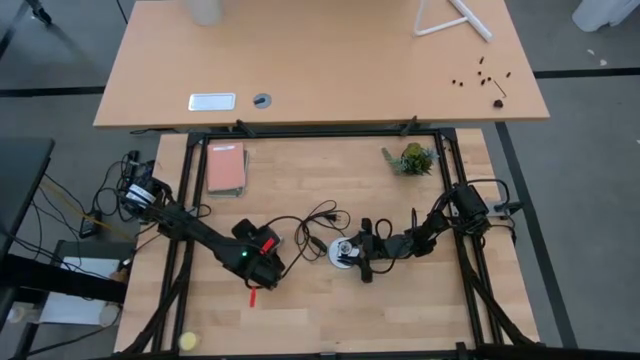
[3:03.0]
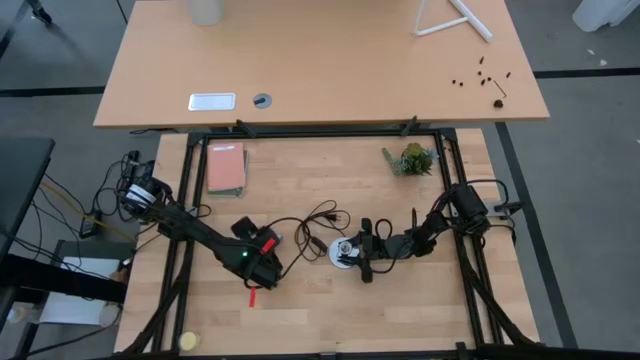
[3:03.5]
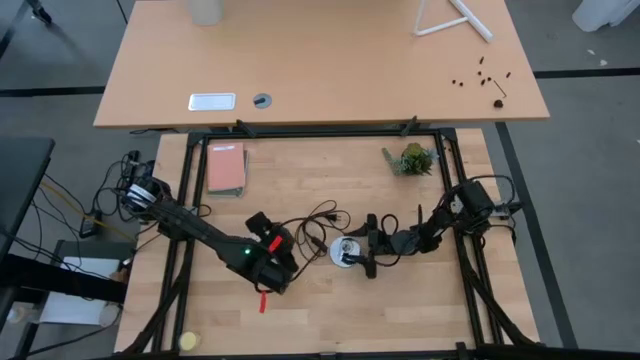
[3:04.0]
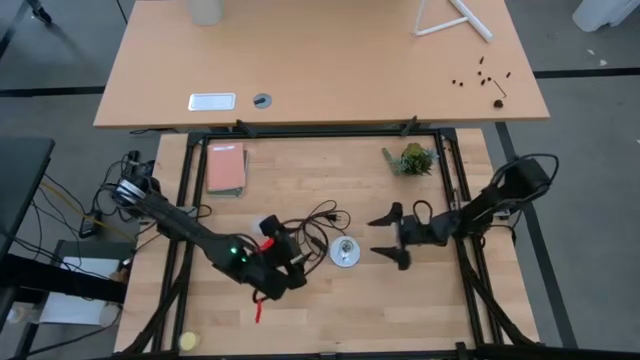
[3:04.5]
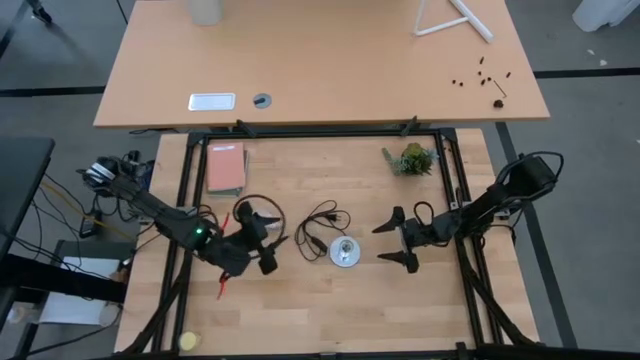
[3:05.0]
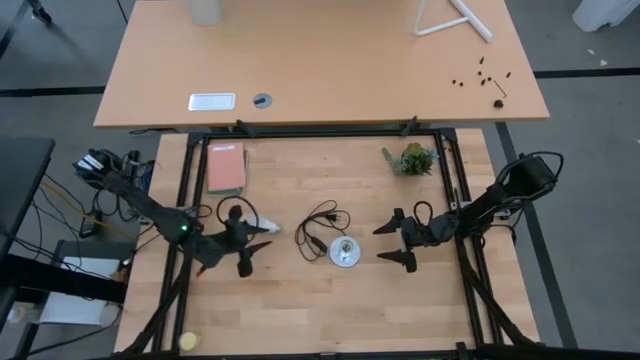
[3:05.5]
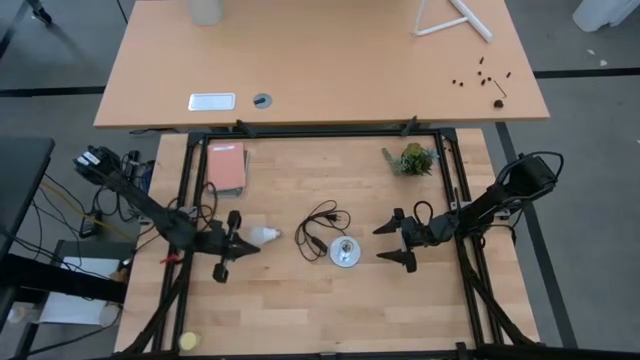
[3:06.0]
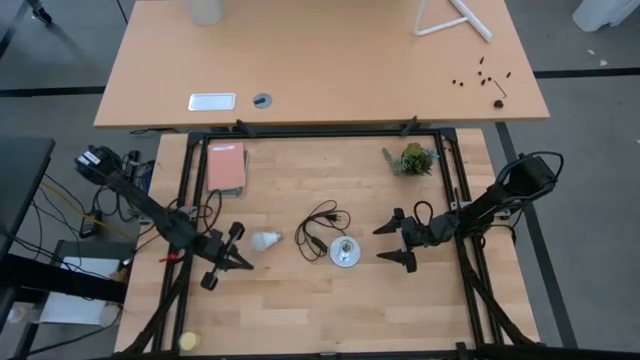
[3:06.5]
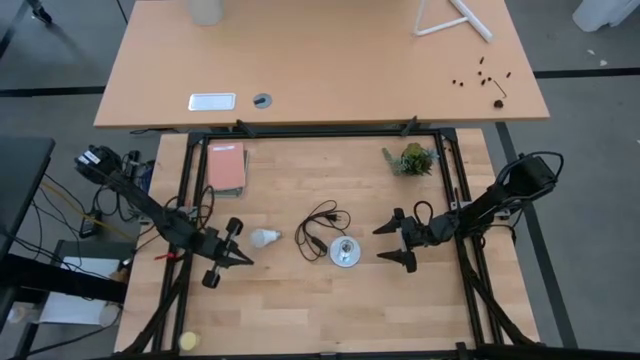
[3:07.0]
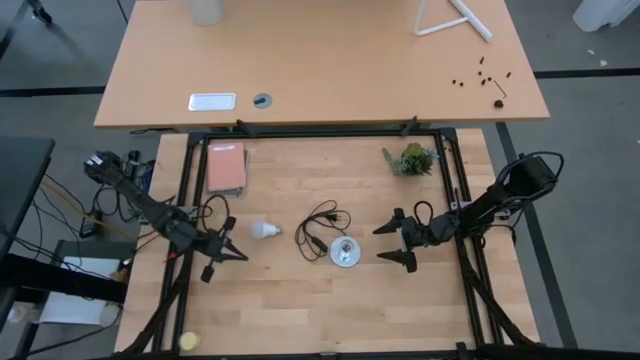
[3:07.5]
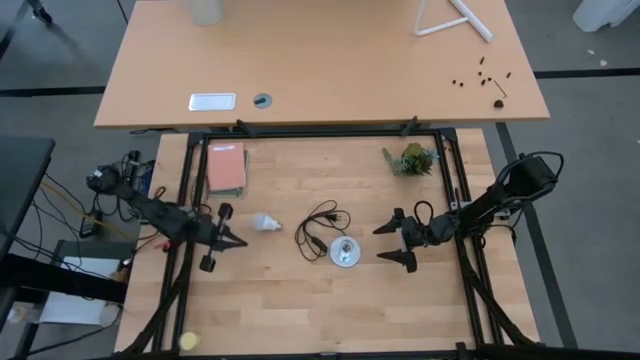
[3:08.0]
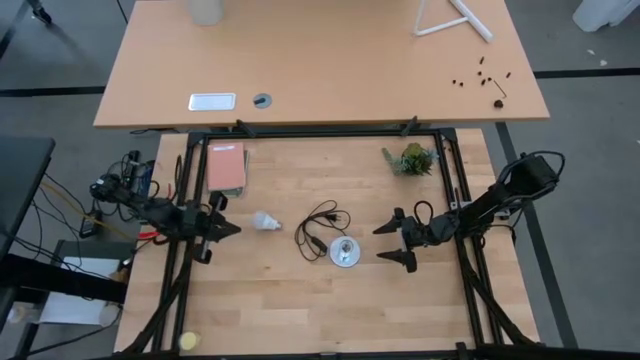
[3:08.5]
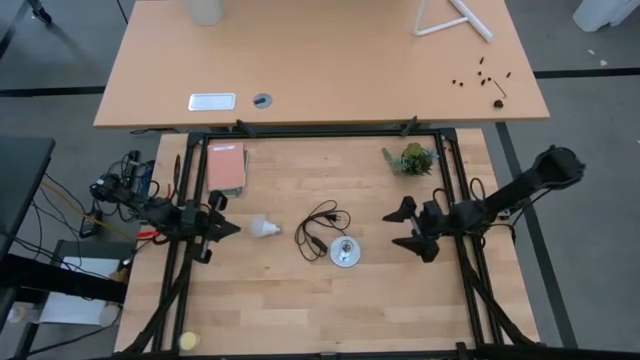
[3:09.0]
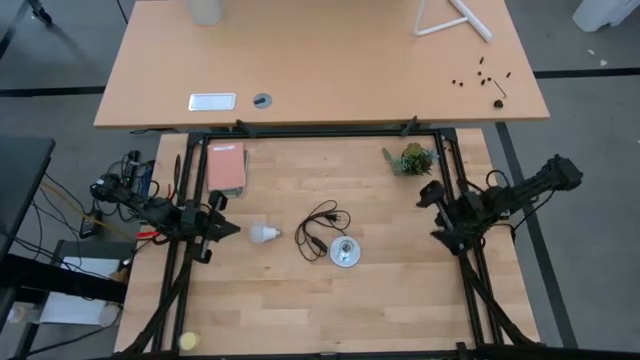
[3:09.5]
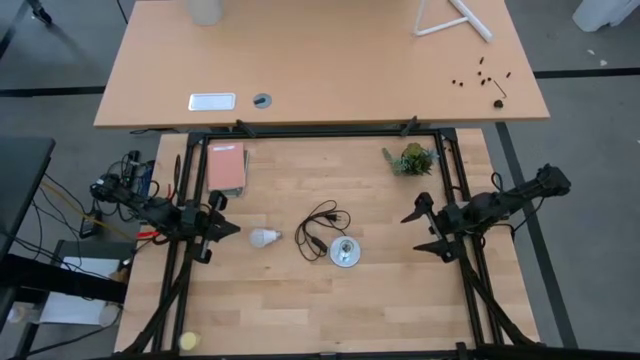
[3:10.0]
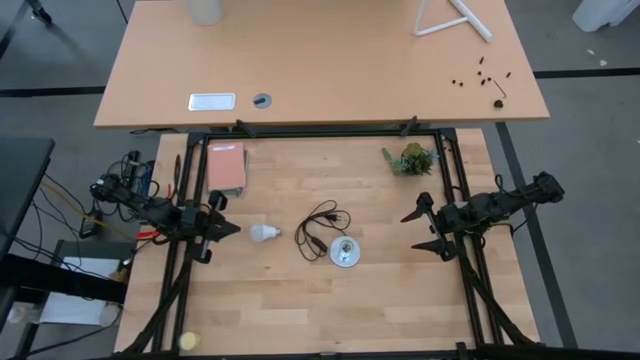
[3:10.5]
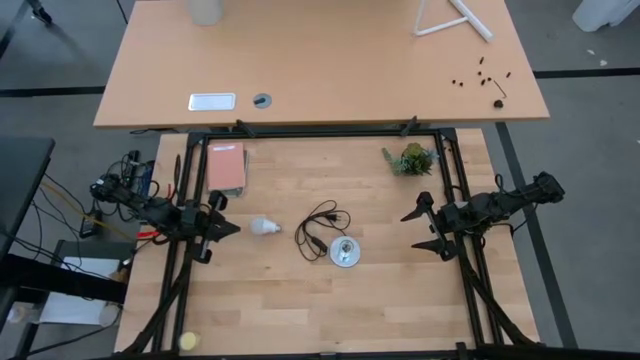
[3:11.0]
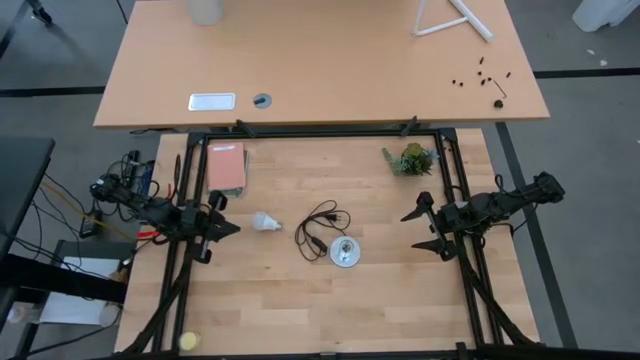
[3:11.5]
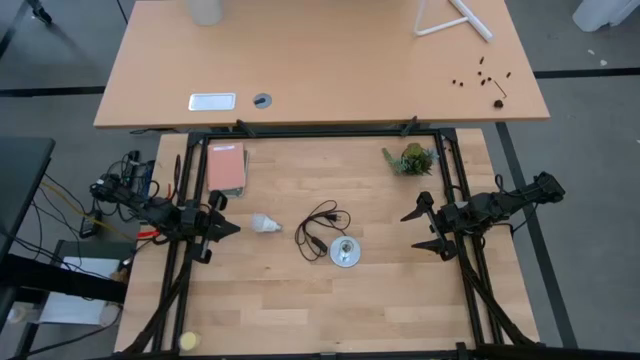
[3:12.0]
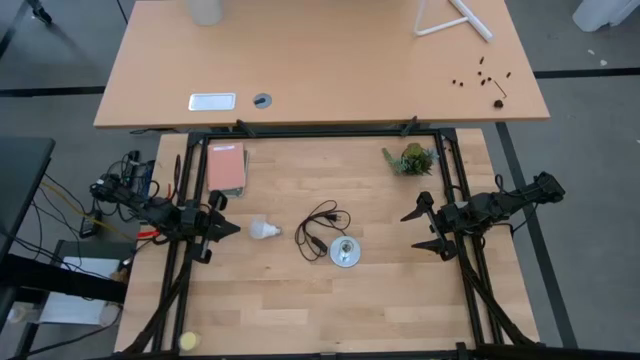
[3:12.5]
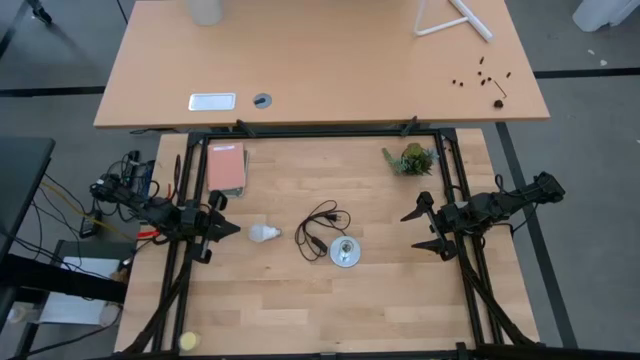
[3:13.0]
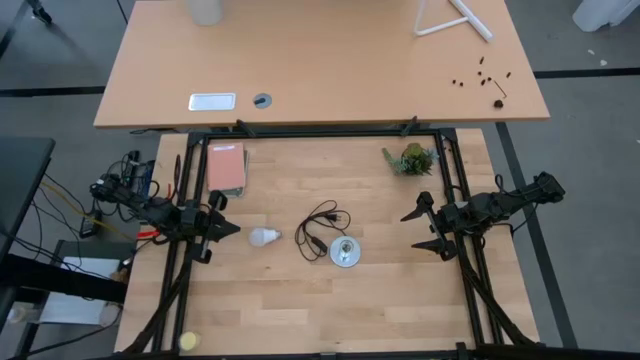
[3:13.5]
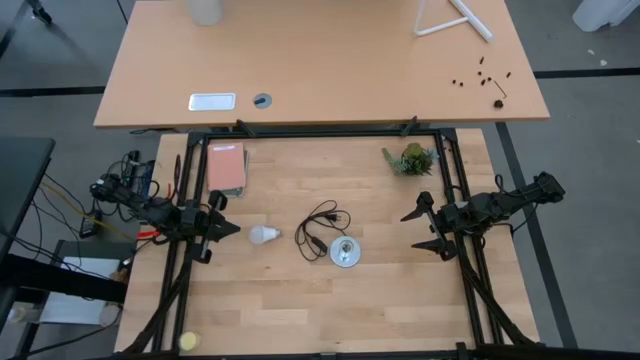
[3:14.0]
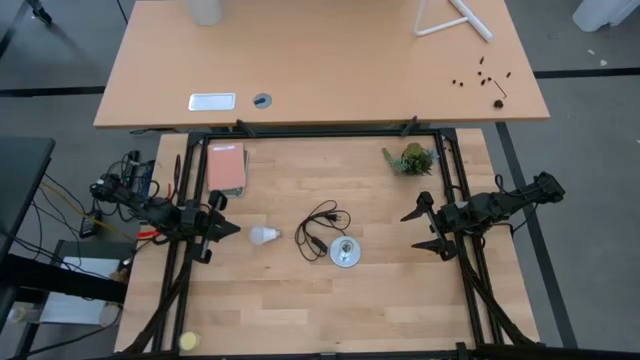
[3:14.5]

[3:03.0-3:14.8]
Task: Screw lightbulb
Return to Home Position

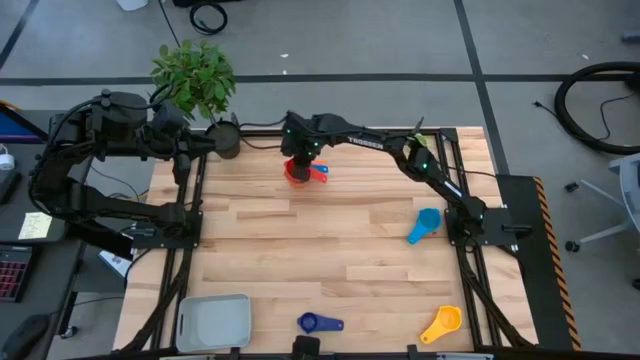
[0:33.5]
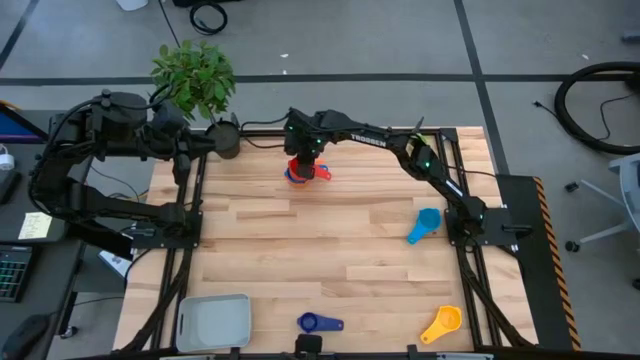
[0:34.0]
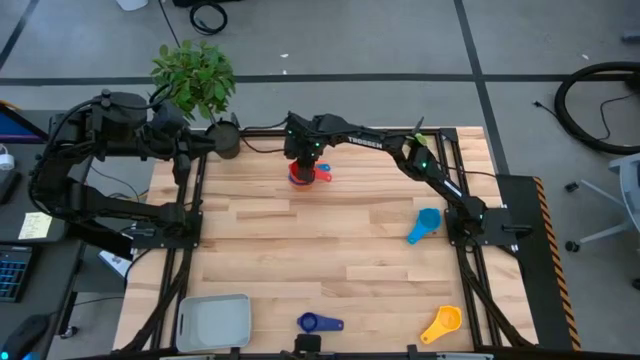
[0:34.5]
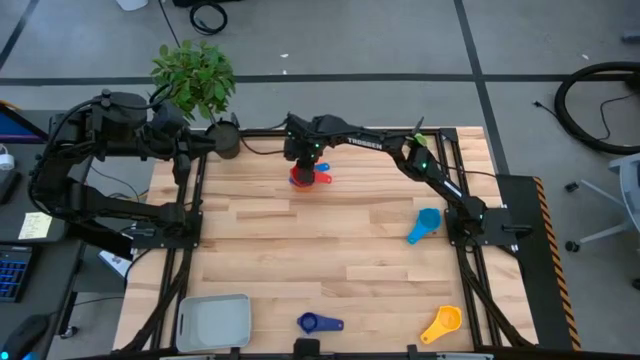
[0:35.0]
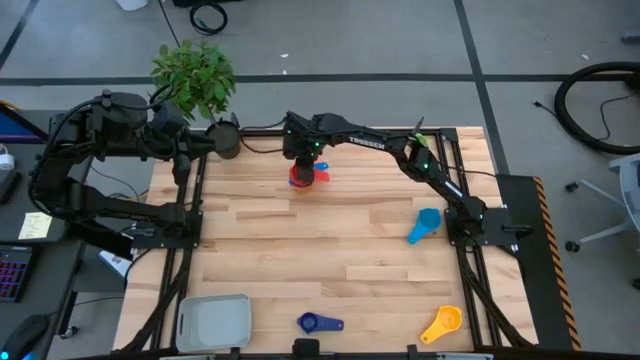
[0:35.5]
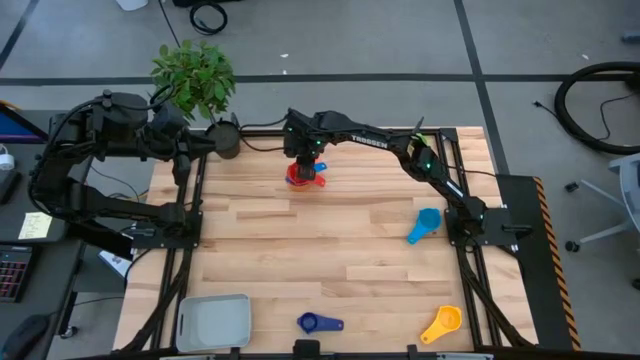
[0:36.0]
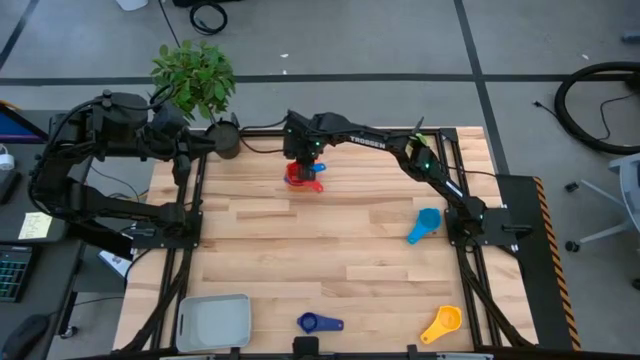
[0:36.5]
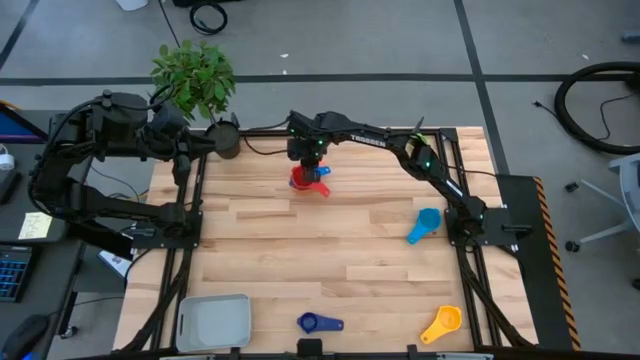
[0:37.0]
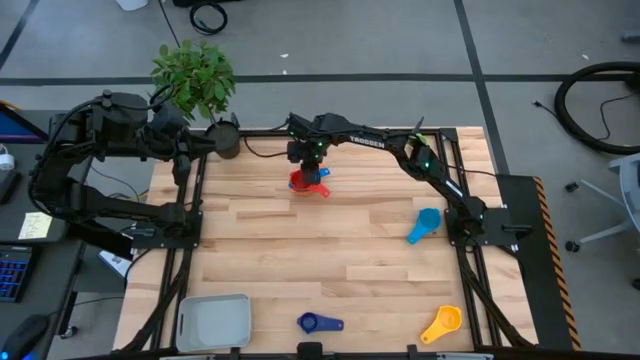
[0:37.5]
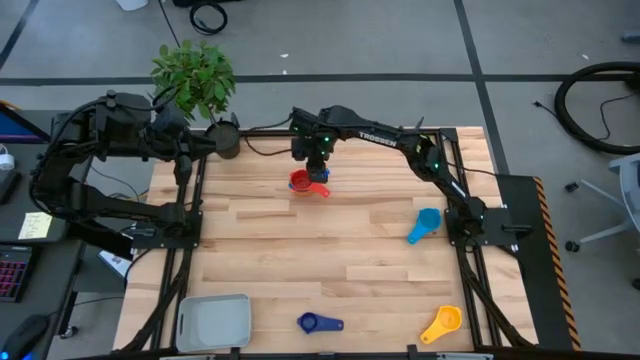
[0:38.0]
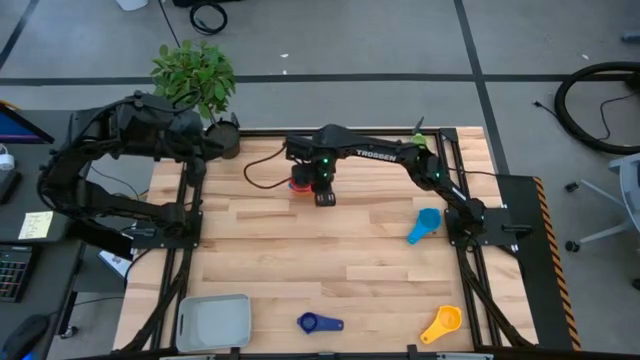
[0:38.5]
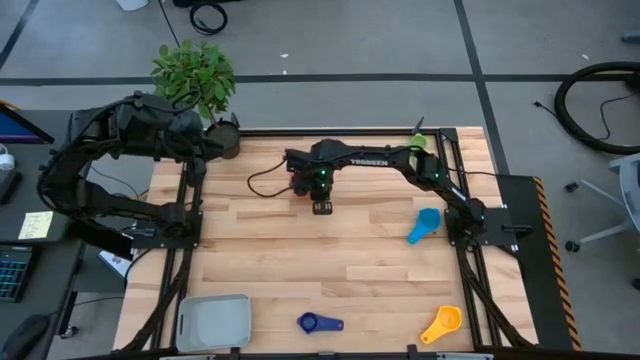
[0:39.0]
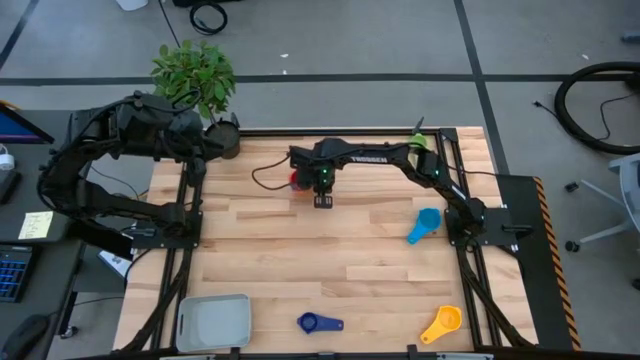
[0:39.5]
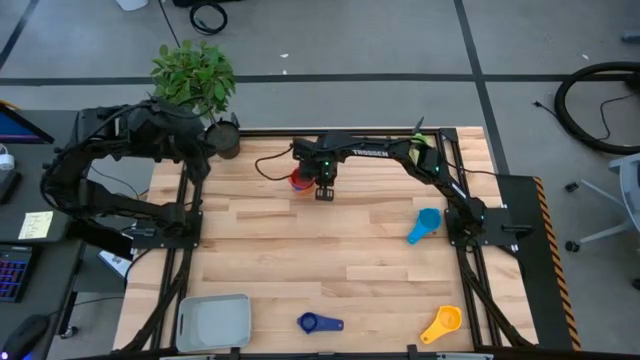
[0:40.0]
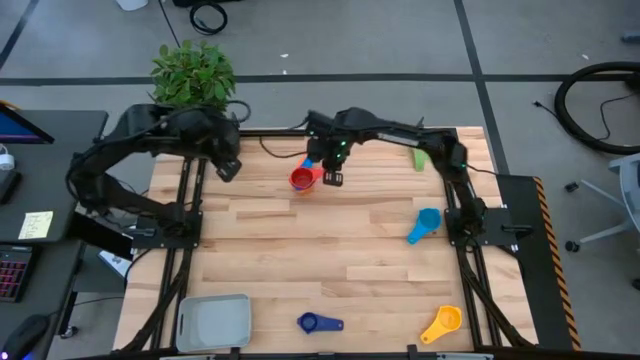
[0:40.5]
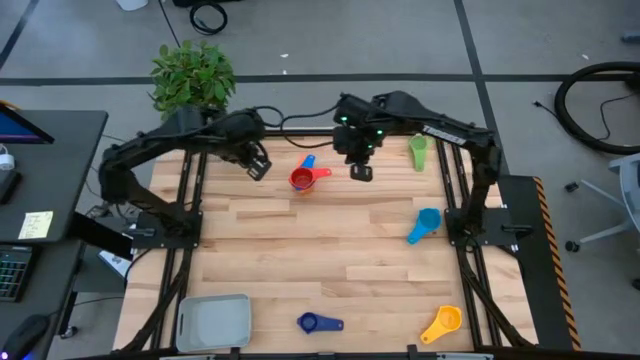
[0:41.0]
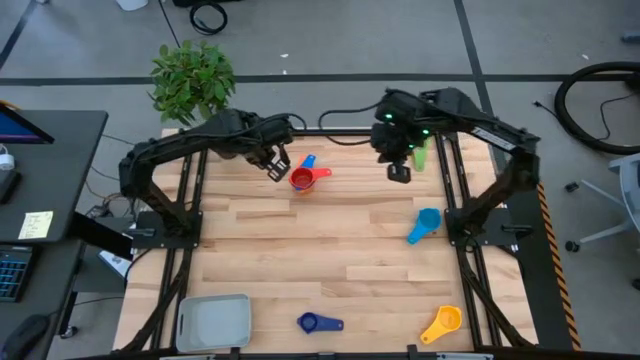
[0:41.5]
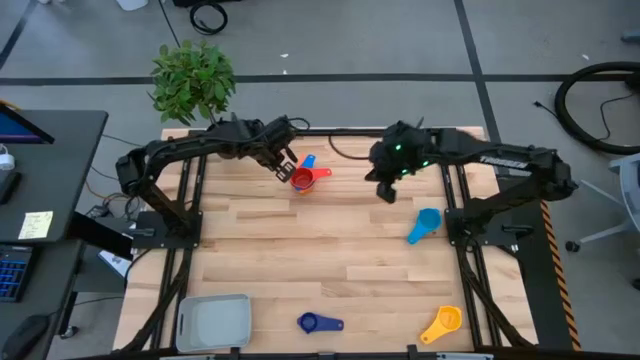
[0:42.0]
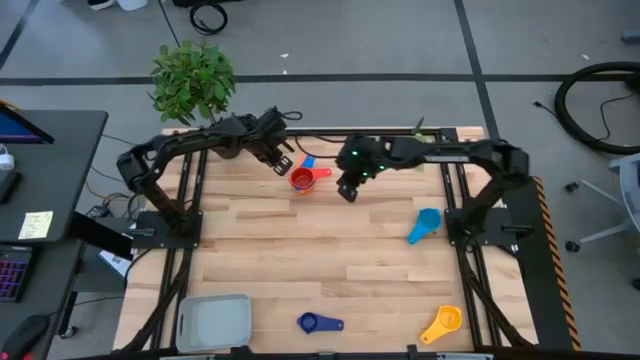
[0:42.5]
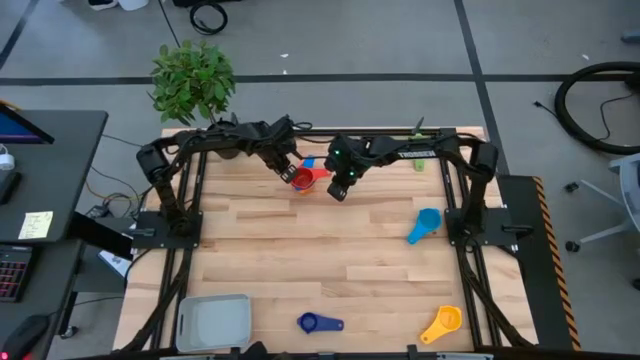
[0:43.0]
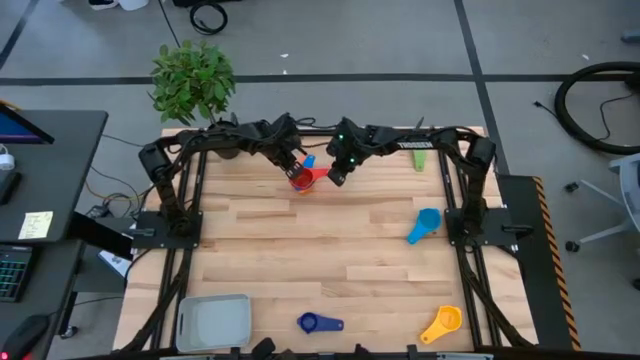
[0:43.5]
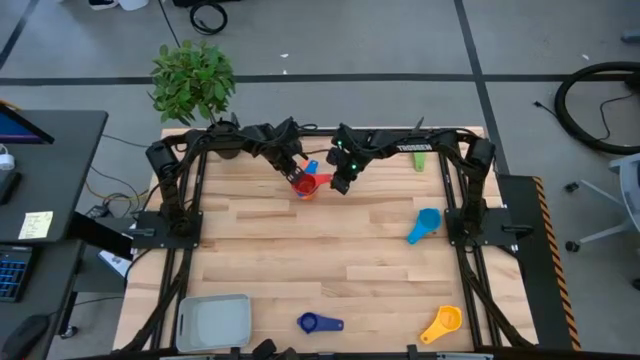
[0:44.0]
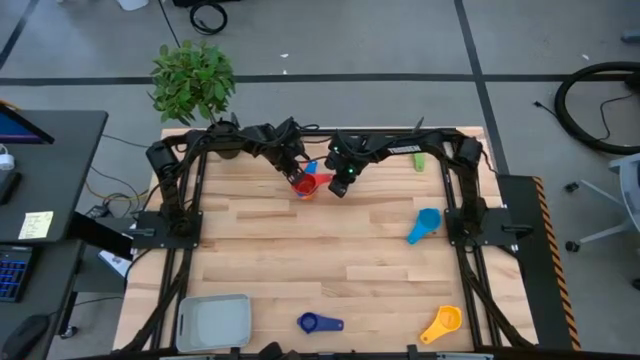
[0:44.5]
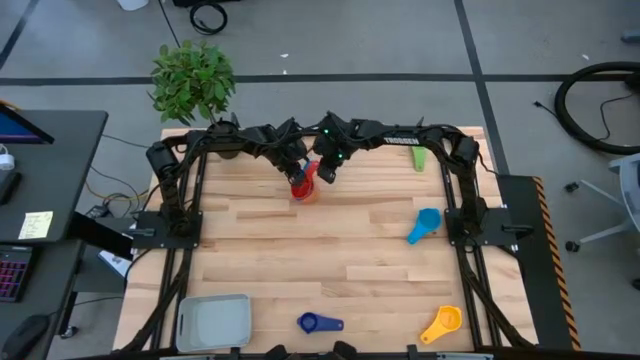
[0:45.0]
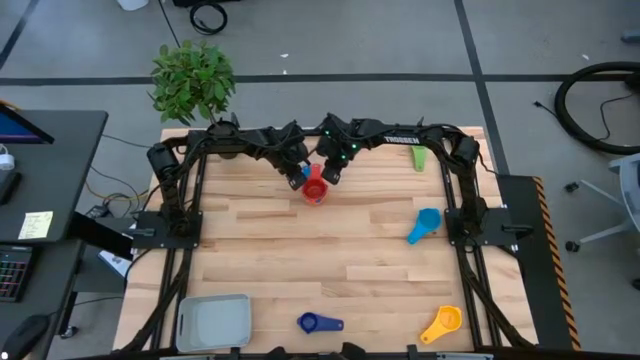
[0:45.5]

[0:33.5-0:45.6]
Task: Nest measuring cups in basket
Stack the red measuring cup on top of the light blue measuring cup
